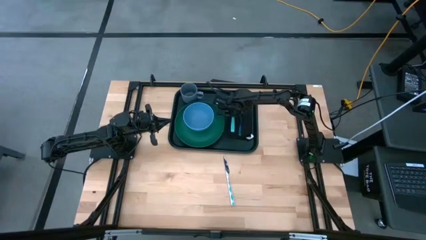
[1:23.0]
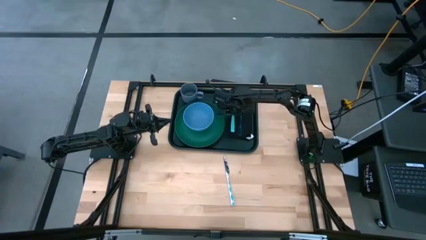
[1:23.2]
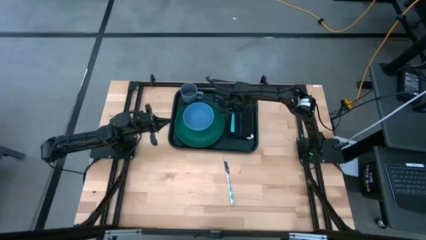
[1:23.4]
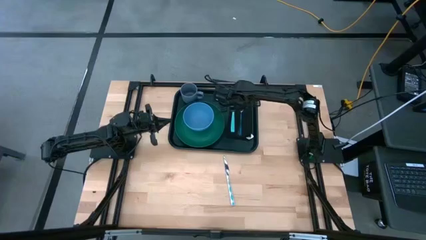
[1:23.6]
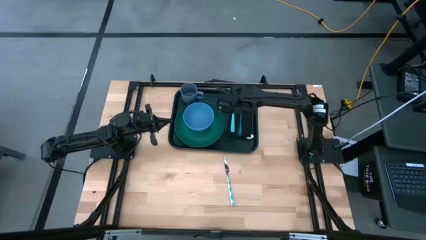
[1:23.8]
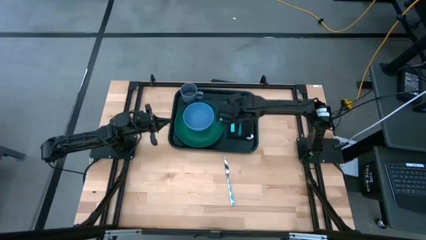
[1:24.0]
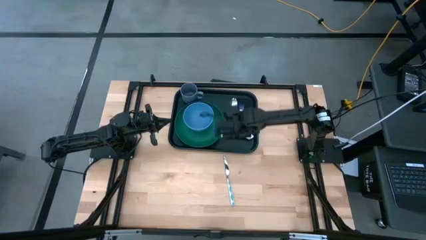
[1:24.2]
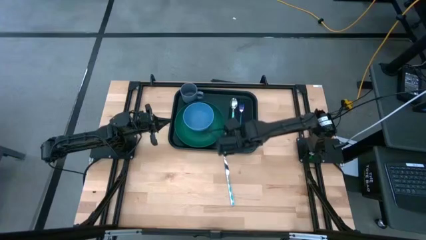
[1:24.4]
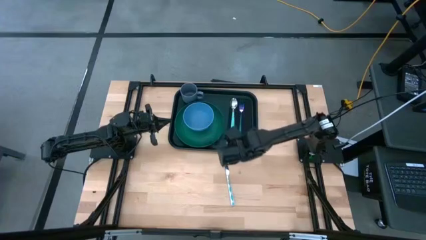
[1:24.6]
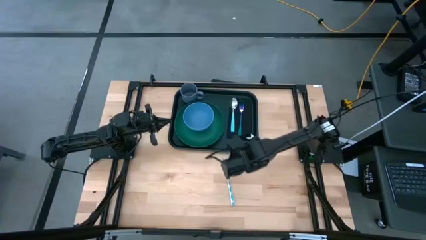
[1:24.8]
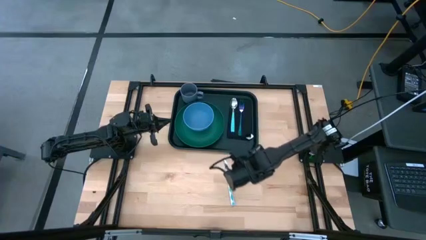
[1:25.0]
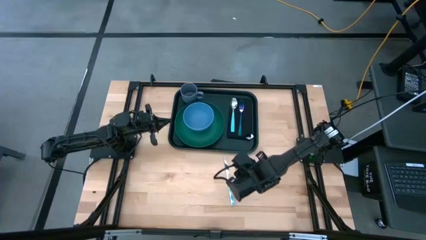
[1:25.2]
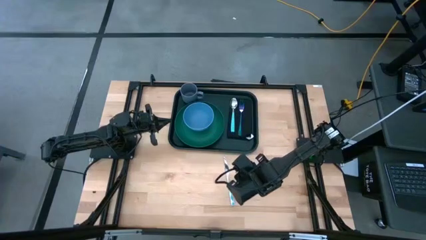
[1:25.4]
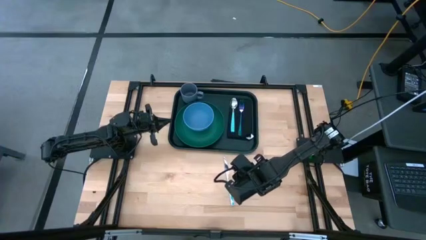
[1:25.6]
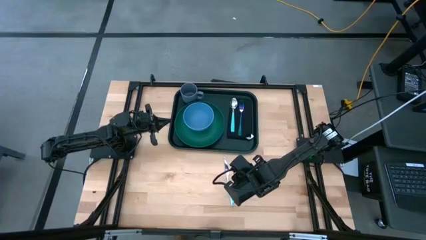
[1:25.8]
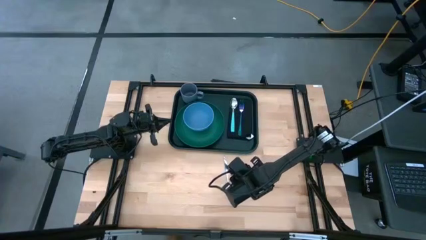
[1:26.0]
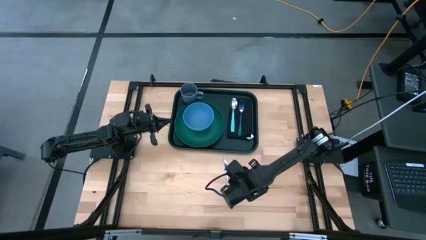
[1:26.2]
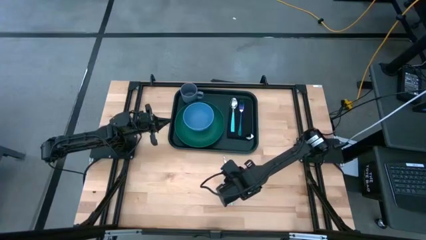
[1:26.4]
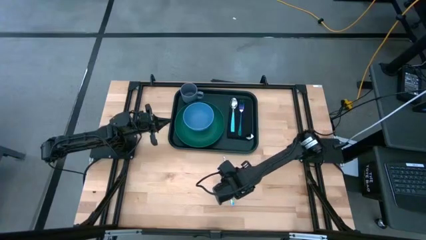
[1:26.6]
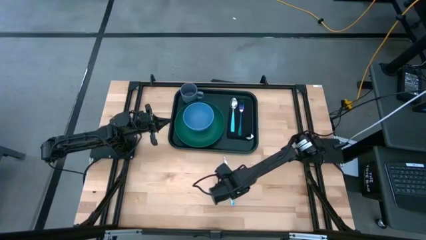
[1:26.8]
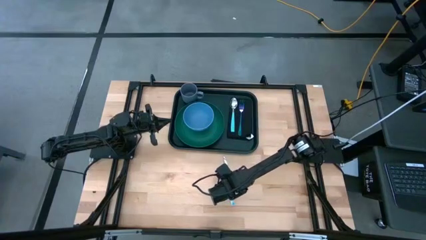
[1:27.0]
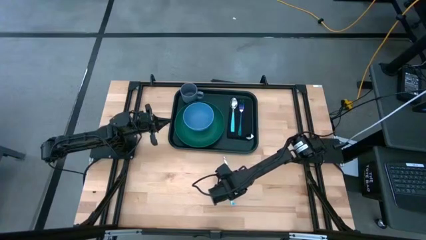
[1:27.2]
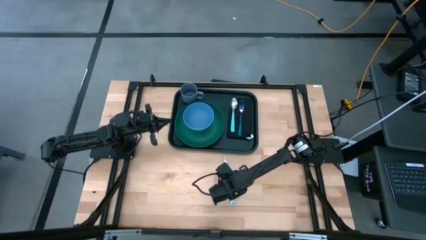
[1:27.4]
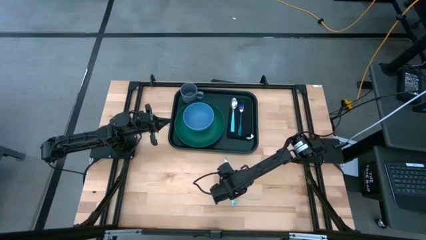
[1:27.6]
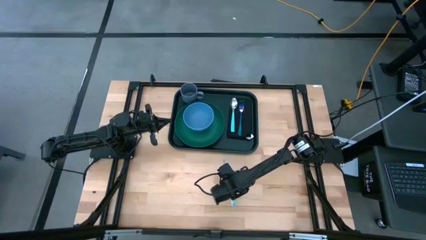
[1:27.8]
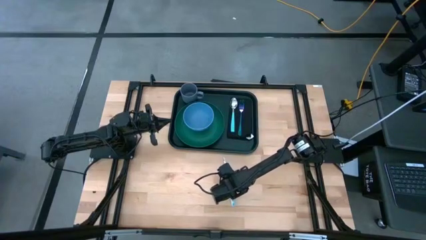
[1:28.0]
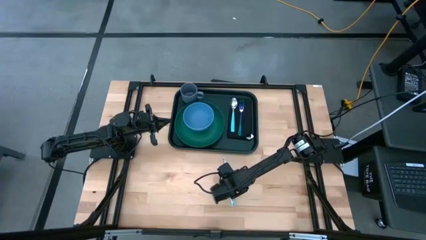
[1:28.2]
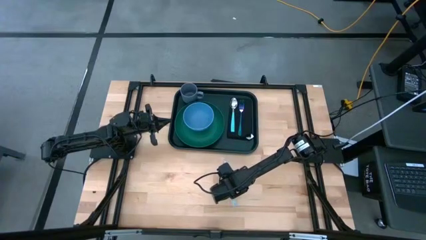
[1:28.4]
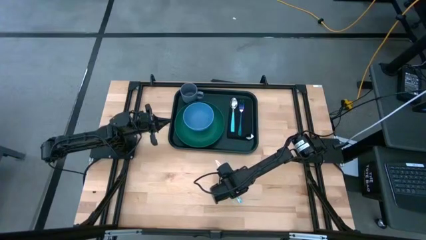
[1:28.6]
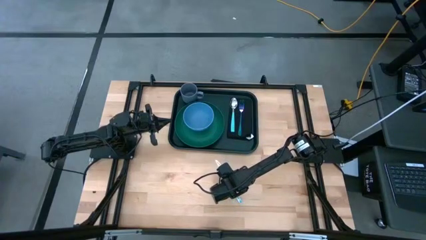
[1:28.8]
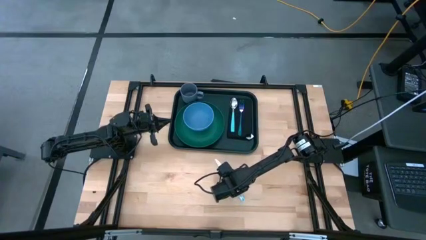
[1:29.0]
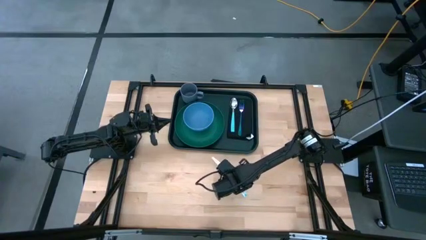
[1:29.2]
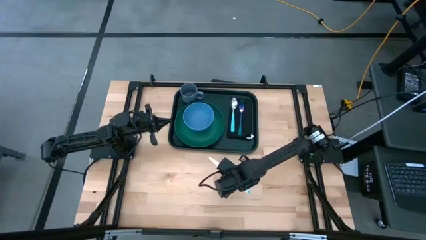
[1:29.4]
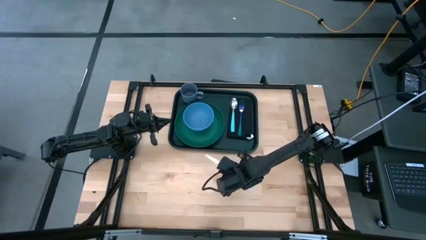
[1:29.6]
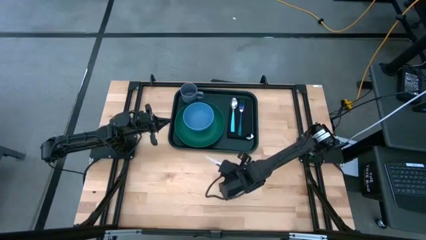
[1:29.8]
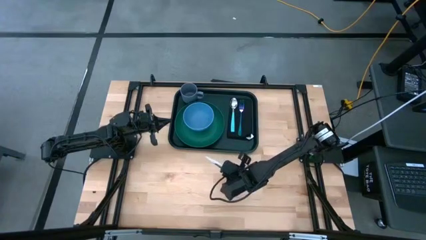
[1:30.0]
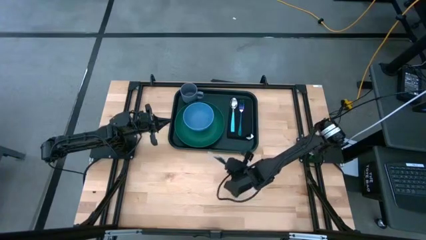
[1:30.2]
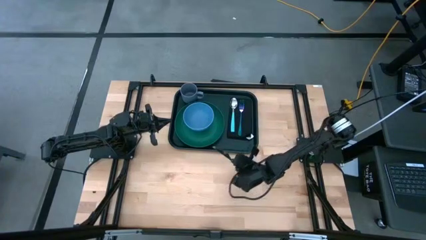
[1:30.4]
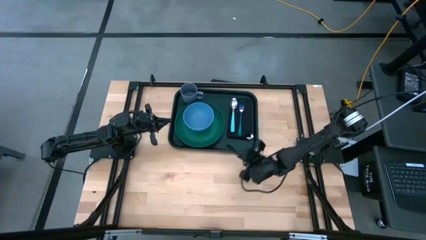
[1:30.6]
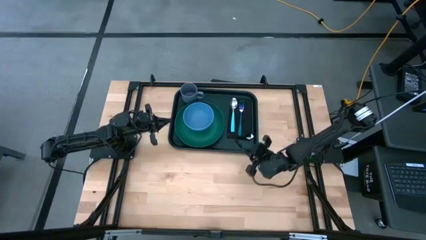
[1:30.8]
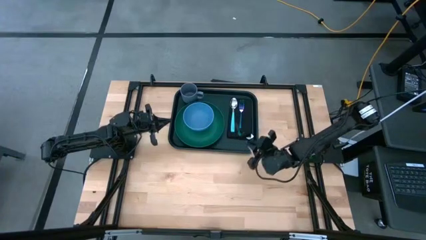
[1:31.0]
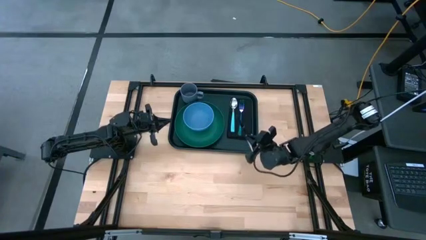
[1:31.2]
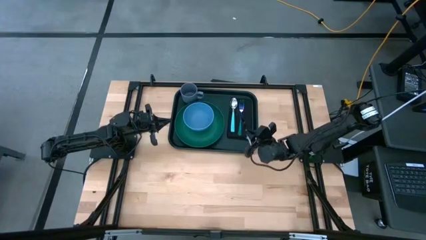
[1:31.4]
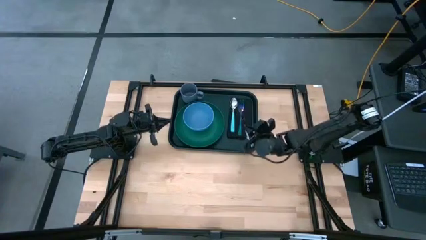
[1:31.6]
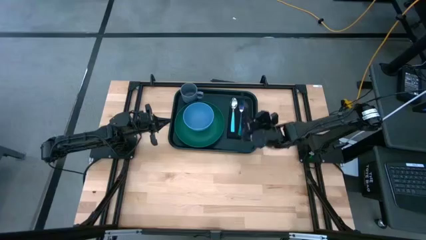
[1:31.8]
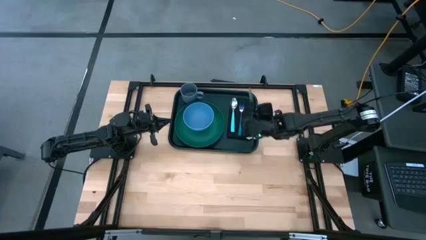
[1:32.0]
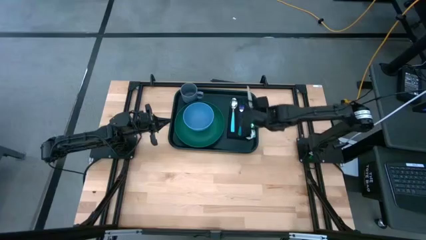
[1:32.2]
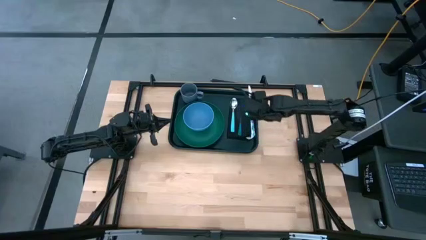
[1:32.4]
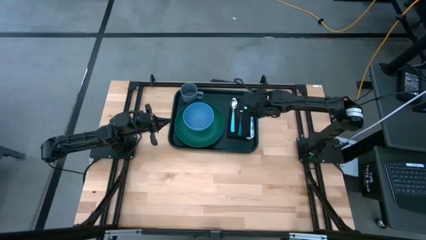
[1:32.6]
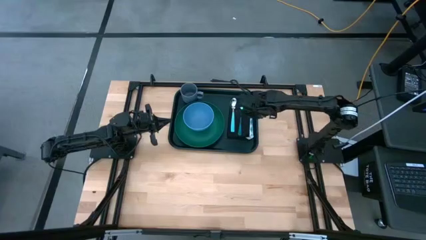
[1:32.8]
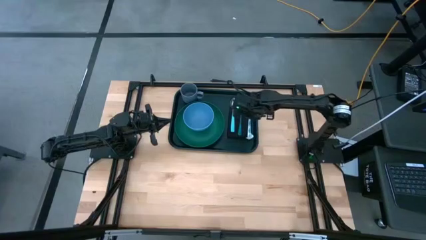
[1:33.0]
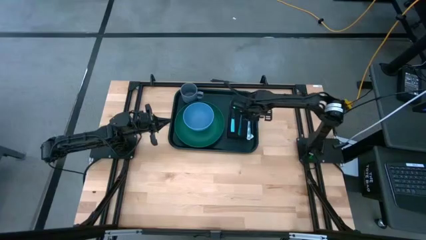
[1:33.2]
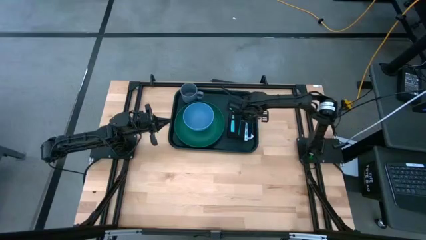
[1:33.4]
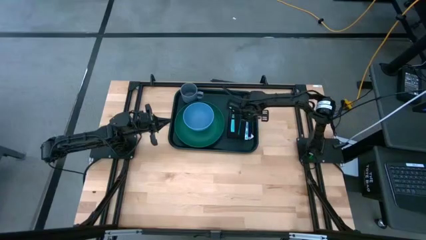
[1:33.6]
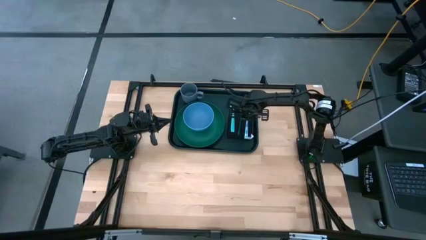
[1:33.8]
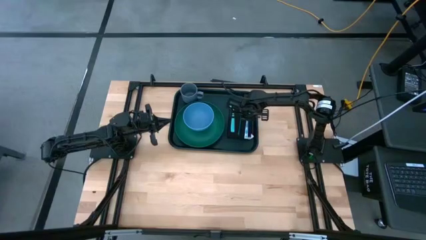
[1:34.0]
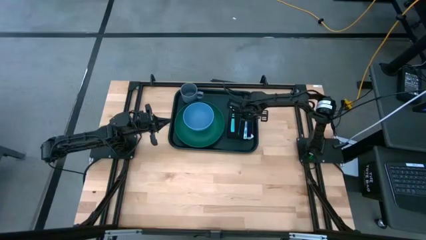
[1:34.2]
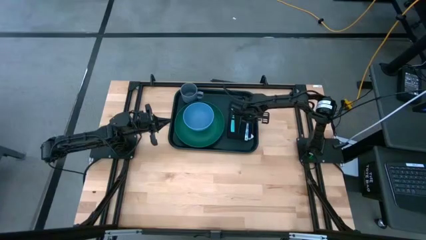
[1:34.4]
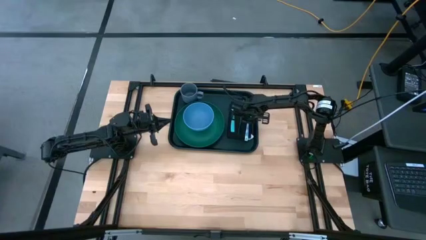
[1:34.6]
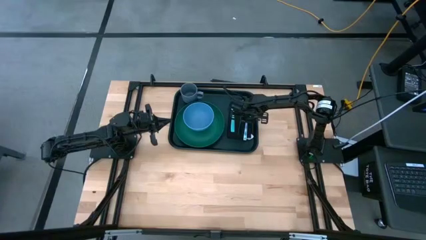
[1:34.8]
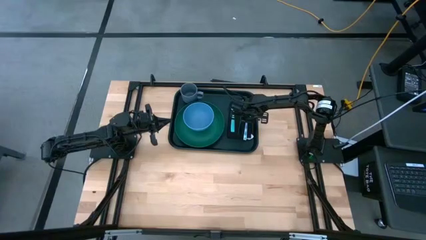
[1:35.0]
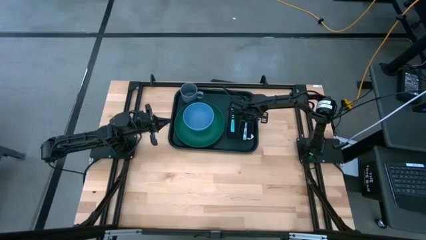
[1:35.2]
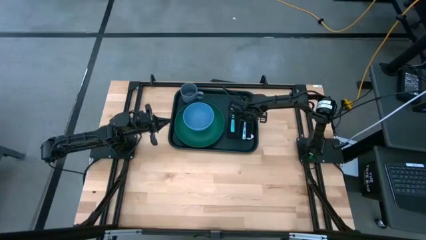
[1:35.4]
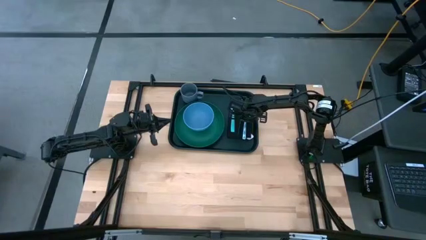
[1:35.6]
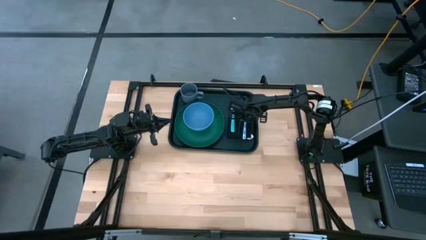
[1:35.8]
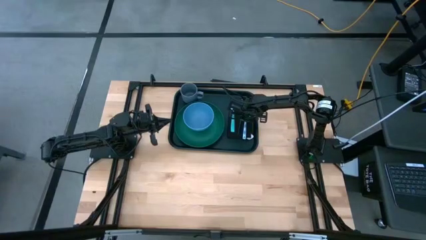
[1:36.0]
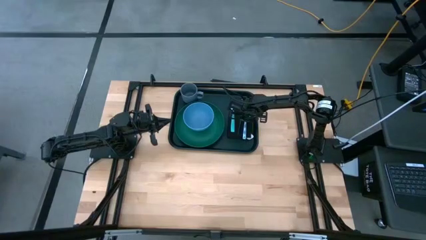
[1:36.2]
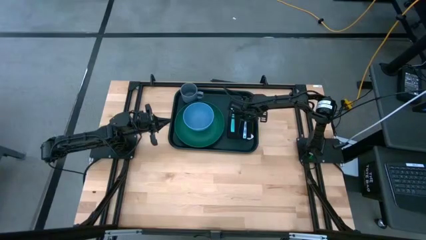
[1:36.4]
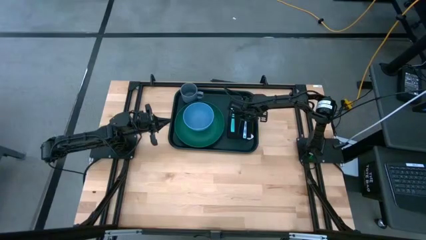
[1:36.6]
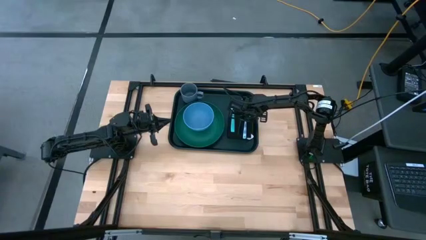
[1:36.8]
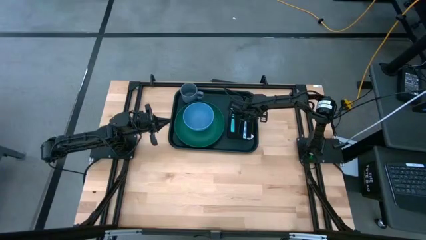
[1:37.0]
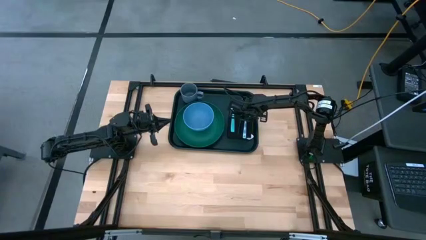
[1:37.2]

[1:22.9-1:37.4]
Task: Set up tray
Put the blue knife on the black napkin to the right of the blue fork
